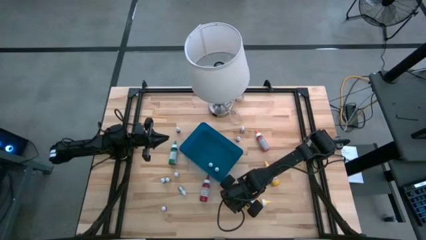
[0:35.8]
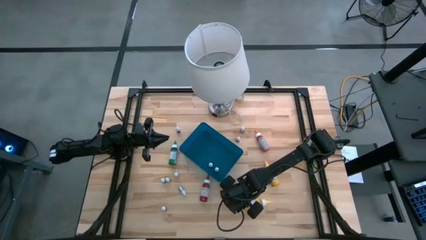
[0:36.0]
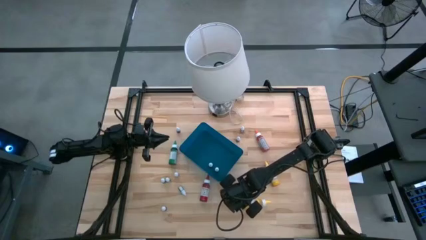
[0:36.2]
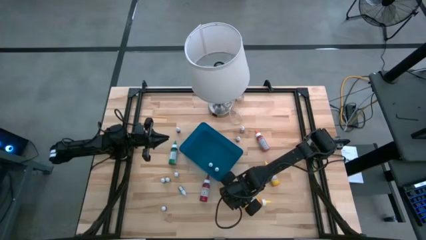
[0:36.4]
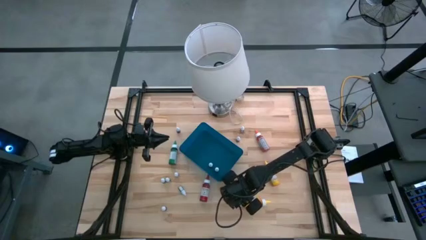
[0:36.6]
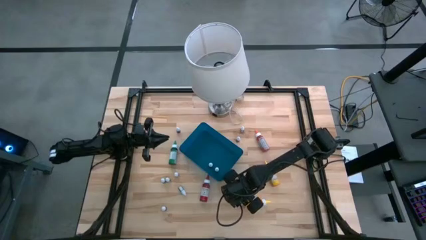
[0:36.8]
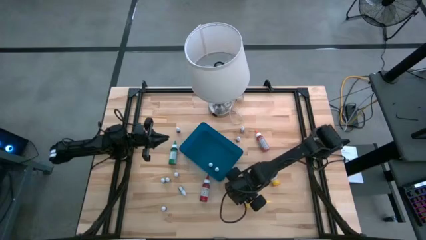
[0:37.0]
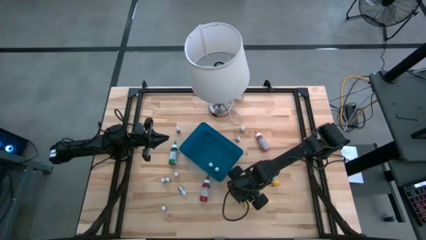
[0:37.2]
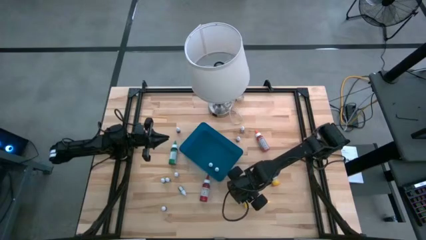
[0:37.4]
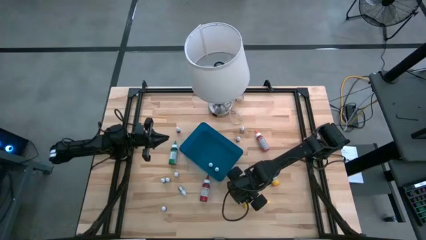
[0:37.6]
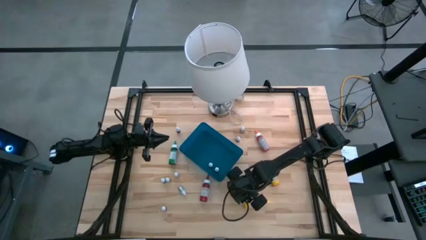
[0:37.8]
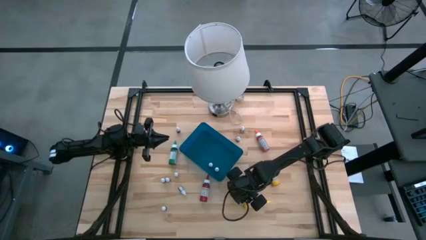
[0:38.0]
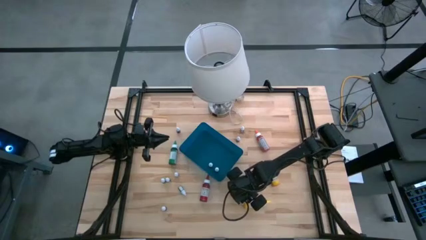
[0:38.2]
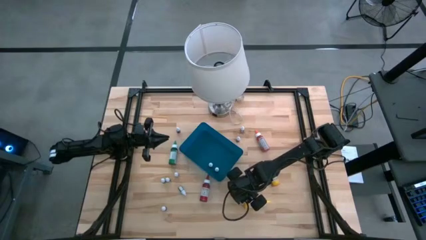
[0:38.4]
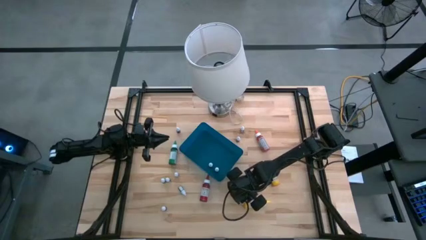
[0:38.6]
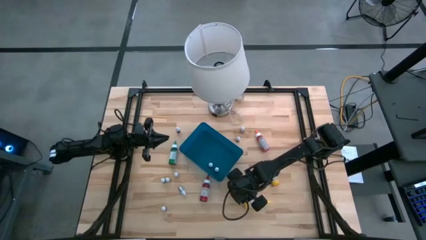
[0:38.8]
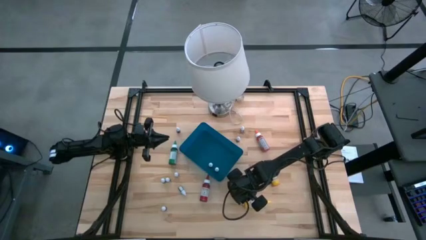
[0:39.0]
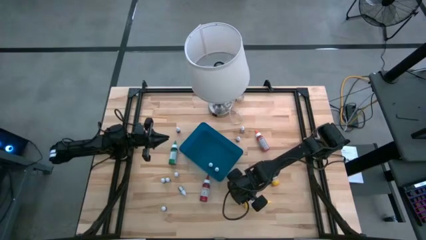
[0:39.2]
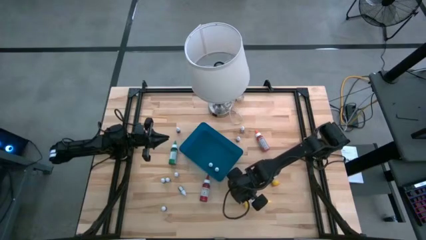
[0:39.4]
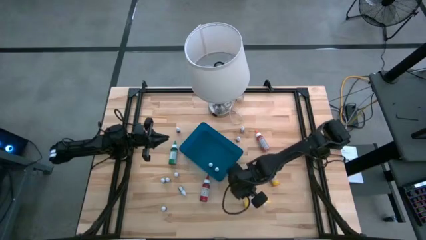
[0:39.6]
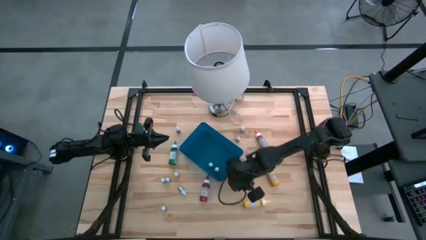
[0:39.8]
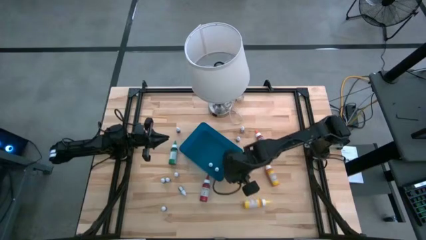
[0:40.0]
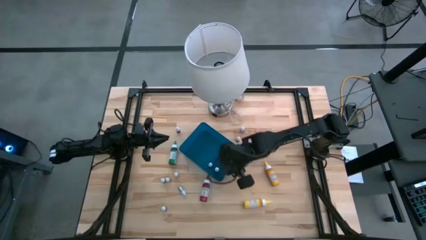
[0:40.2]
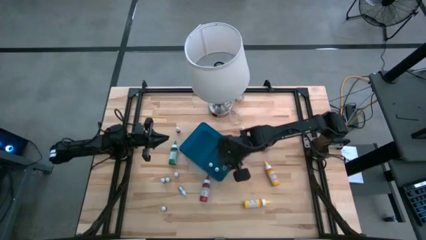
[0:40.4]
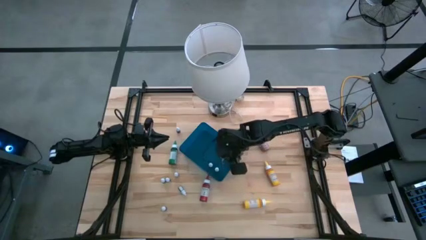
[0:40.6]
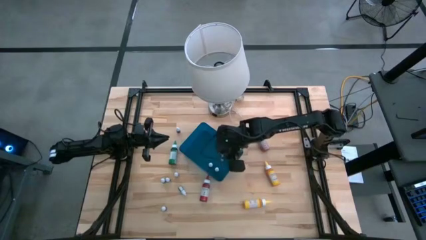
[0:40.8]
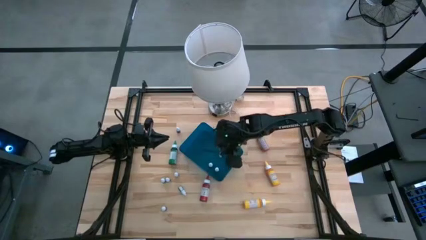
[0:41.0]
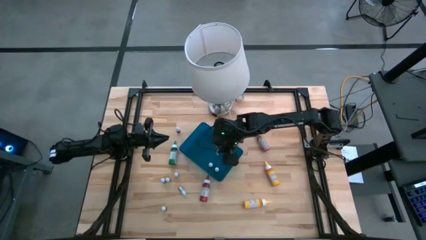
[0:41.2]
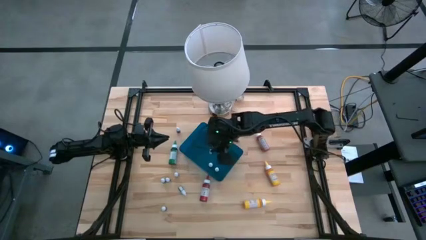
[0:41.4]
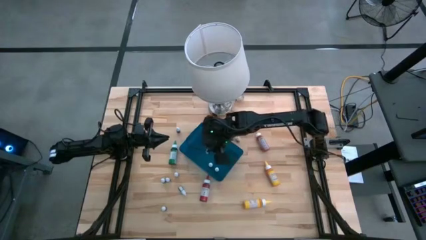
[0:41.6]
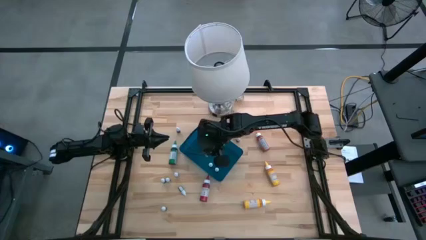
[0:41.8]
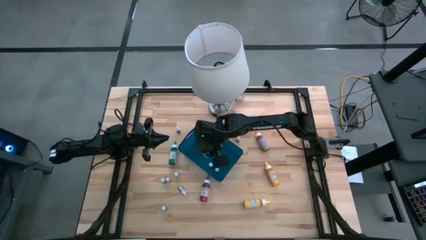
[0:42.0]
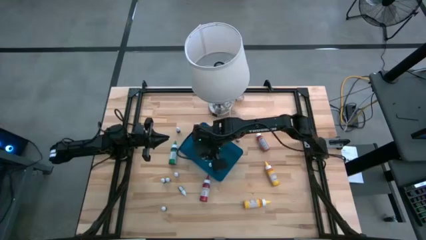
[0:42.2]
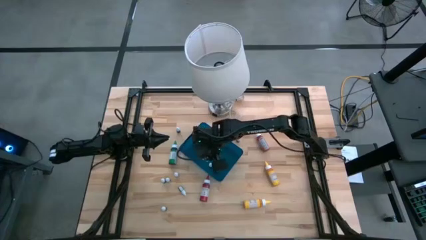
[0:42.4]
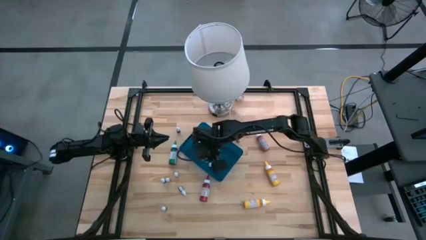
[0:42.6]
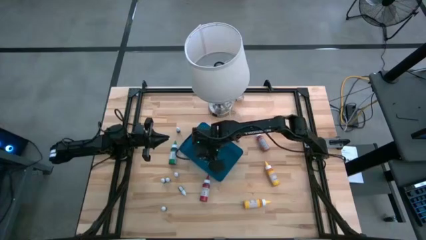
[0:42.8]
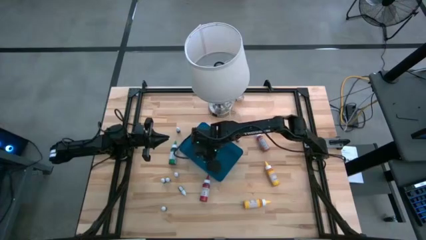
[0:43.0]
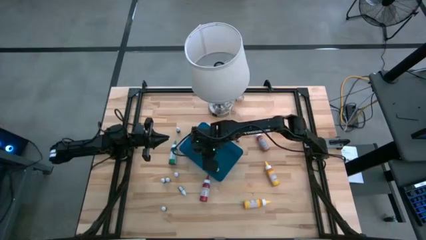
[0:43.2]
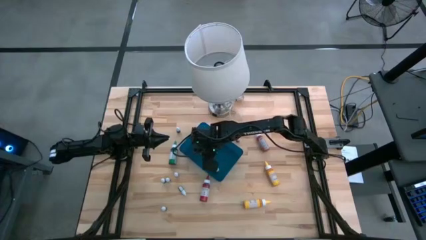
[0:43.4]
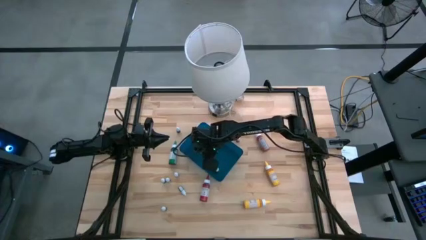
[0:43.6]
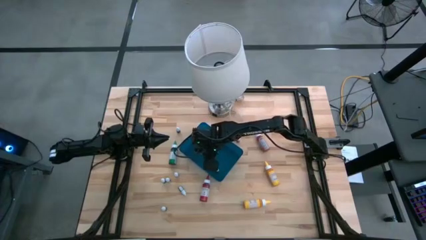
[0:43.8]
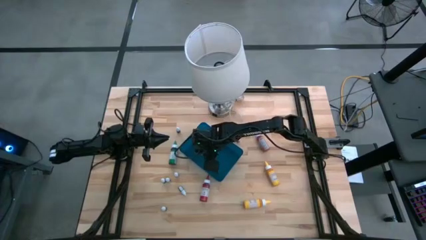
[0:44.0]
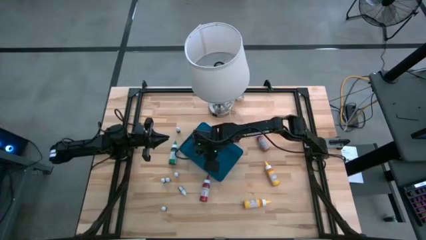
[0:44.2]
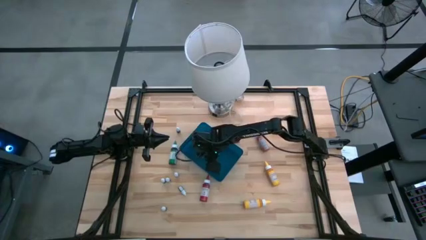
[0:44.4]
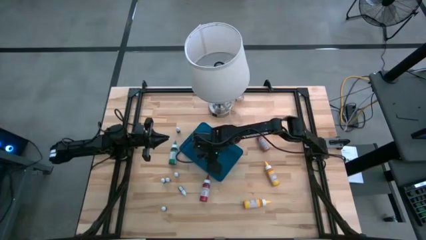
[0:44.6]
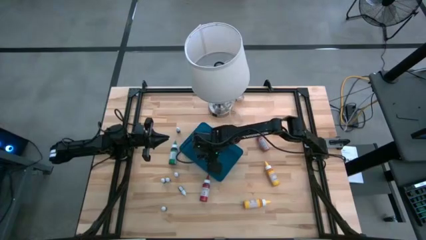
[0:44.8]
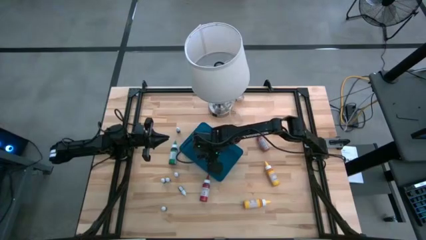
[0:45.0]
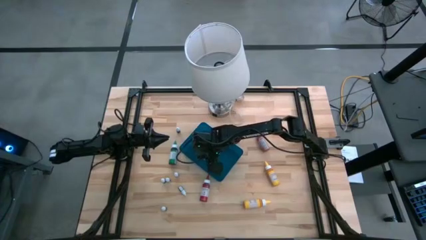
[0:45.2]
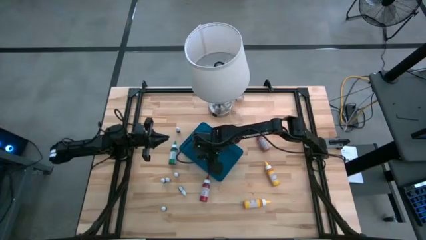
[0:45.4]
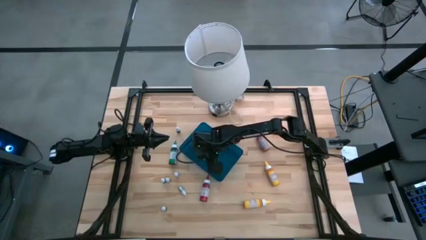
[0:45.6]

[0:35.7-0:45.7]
Task: Pick & Place food coloring
Put the small green food coloring bottle into the blue container

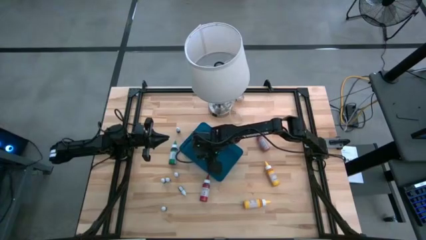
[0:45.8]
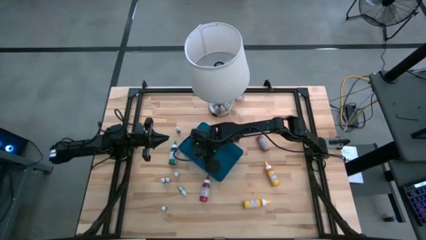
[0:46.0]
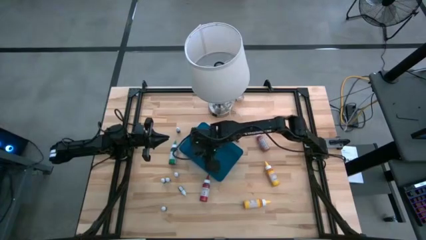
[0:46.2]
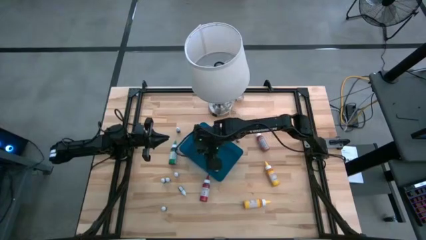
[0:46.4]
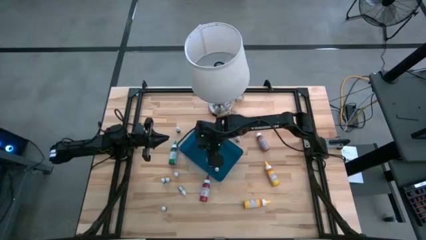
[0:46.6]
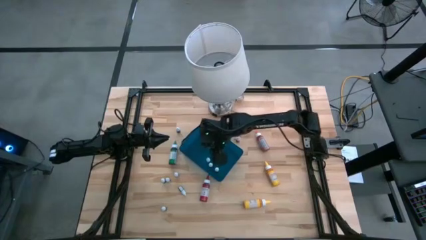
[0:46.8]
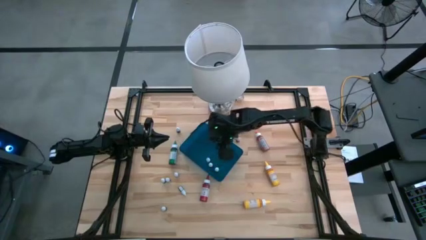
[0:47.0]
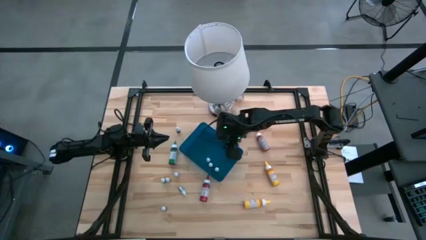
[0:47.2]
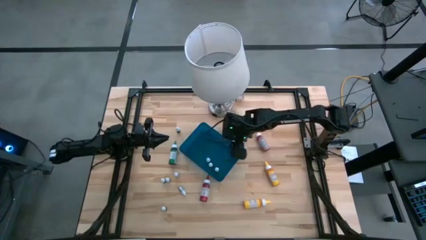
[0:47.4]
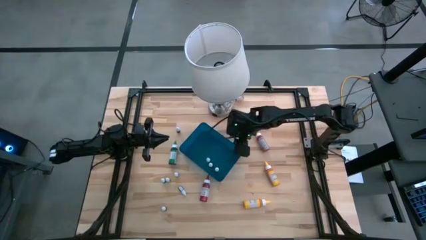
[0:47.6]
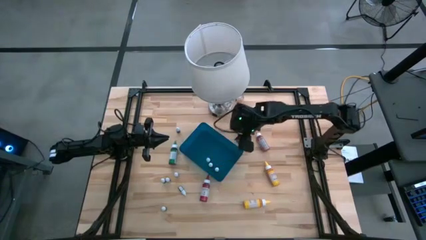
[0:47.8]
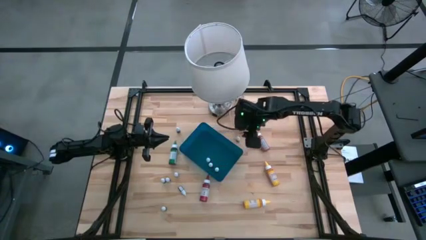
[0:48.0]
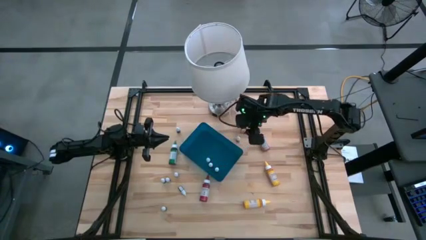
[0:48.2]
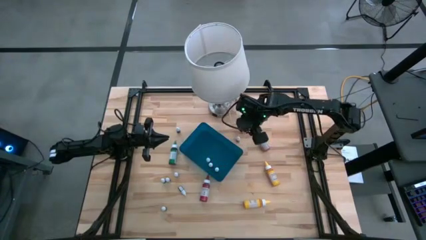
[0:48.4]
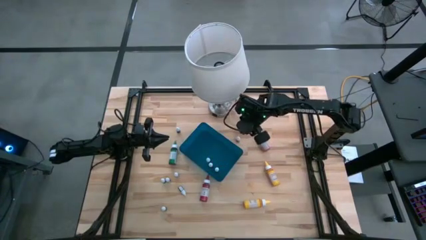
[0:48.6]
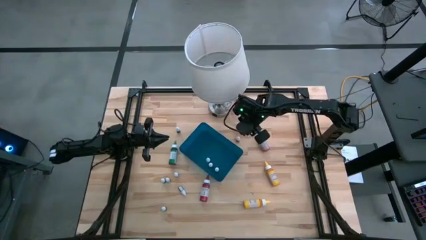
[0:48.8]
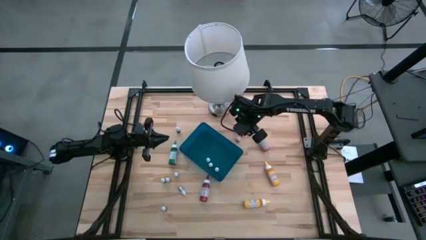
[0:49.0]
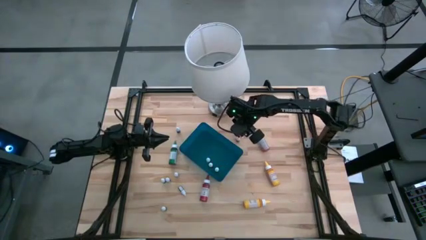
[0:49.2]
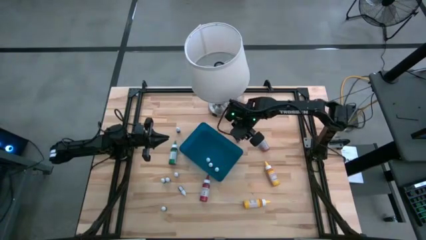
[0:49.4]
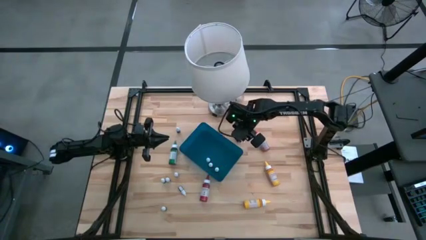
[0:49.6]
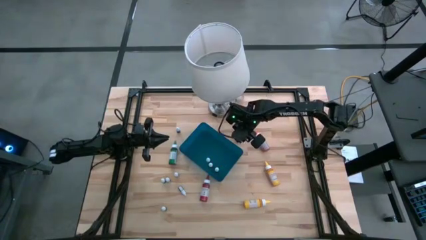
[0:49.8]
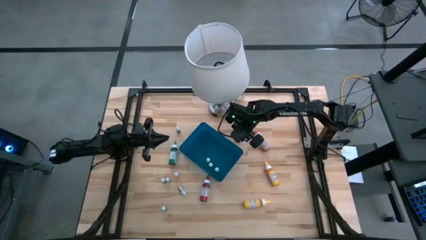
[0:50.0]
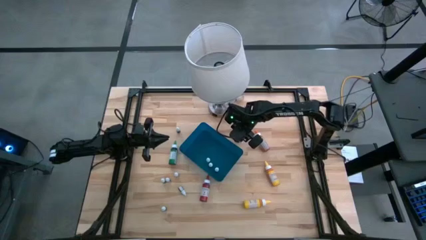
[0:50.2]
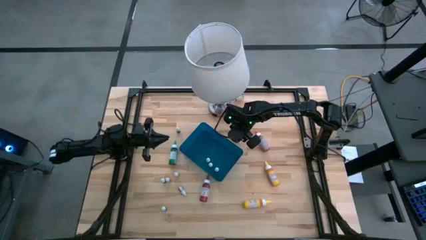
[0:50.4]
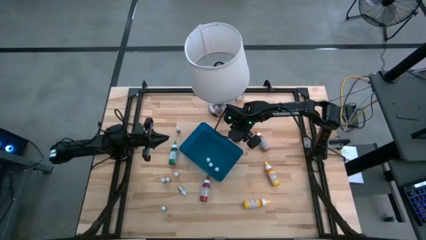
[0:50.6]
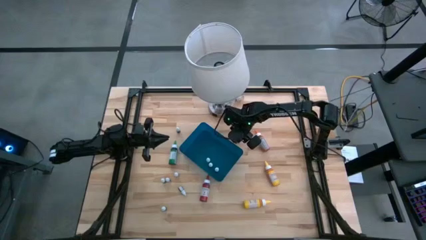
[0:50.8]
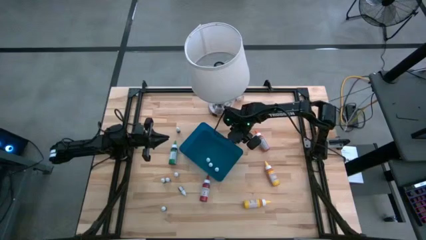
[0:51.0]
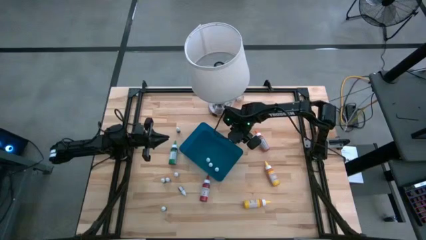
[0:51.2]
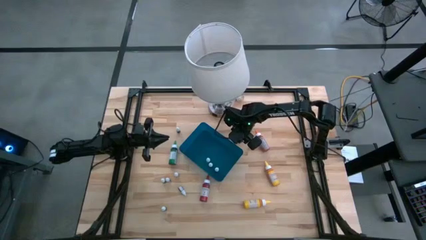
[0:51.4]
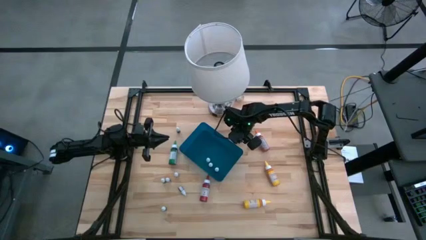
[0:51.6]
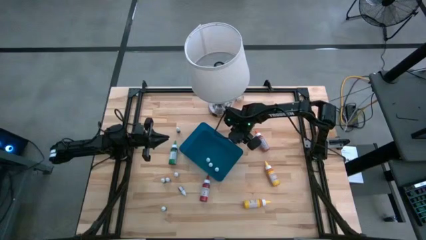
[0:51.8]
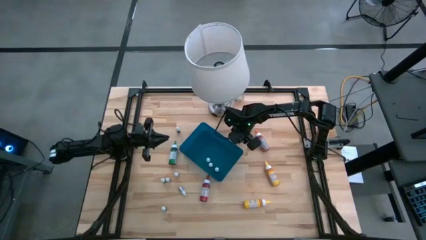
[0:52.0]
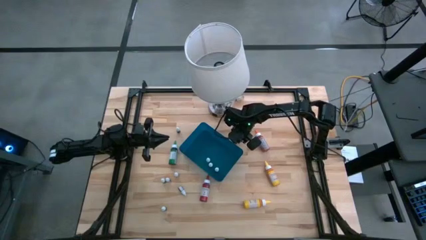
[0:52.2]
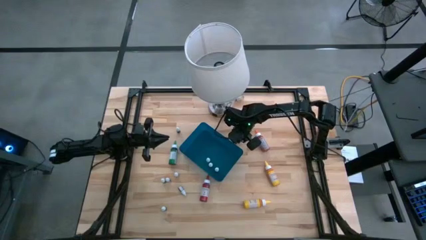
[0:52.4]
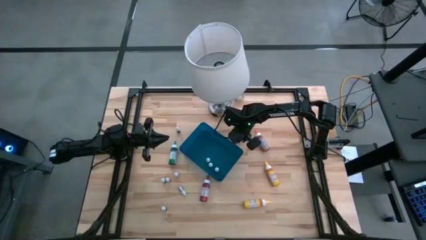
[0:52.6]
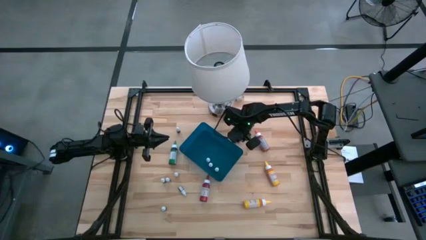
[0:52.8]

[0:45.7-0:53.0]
Put the small red food coloring bottle into the blue container
